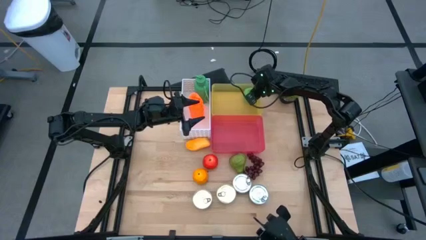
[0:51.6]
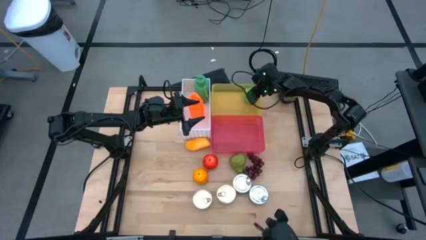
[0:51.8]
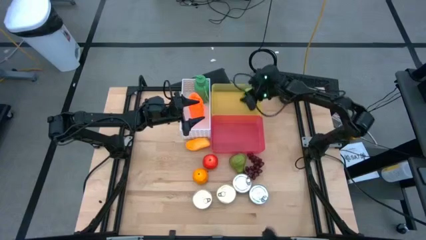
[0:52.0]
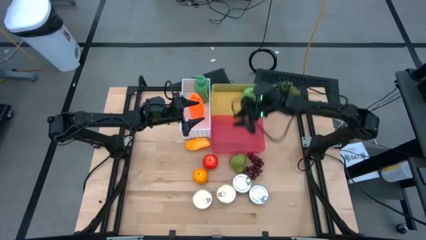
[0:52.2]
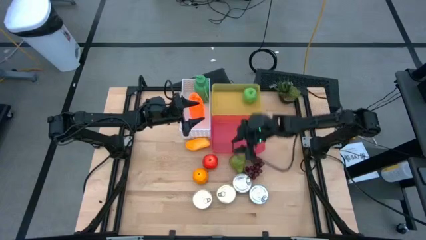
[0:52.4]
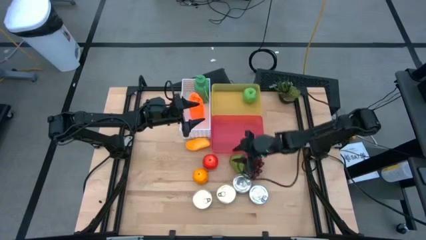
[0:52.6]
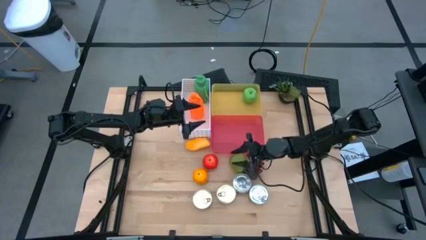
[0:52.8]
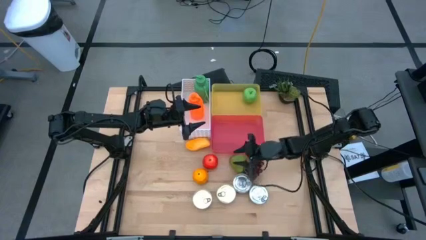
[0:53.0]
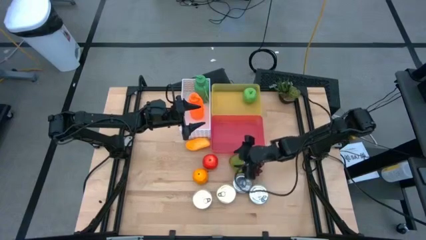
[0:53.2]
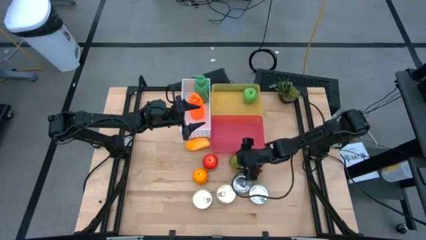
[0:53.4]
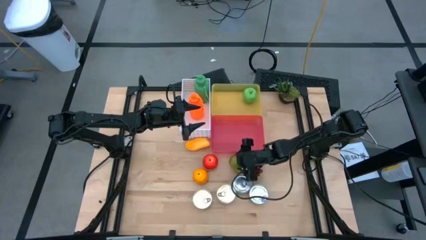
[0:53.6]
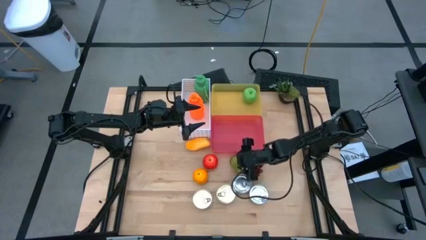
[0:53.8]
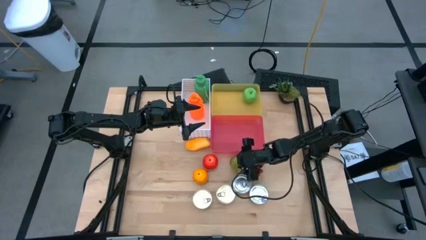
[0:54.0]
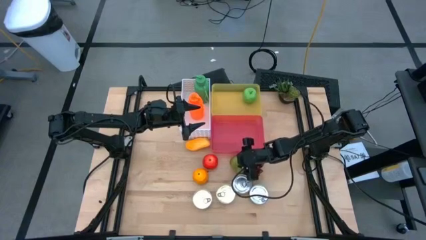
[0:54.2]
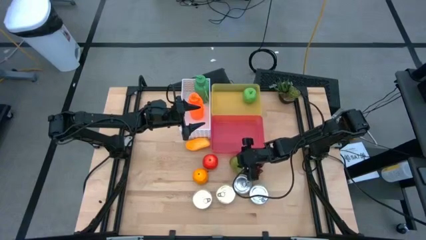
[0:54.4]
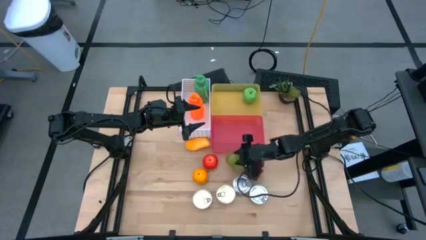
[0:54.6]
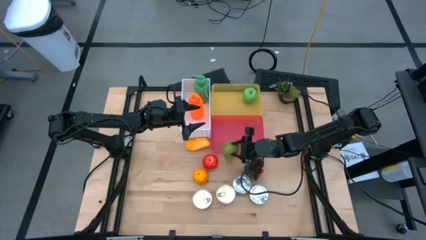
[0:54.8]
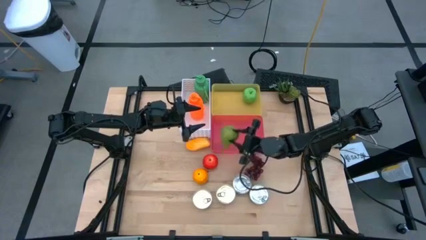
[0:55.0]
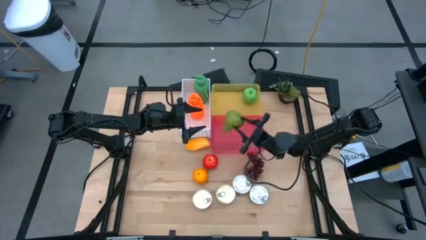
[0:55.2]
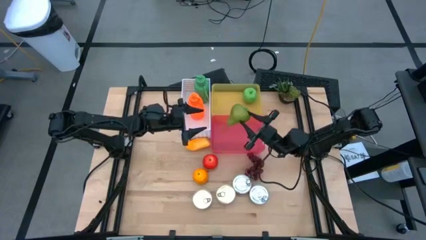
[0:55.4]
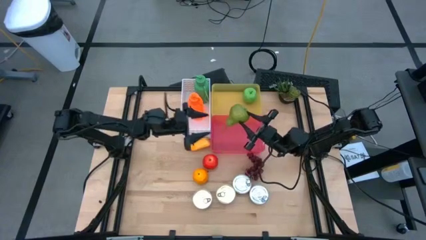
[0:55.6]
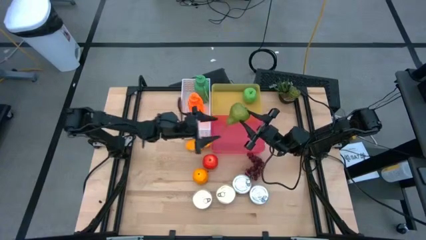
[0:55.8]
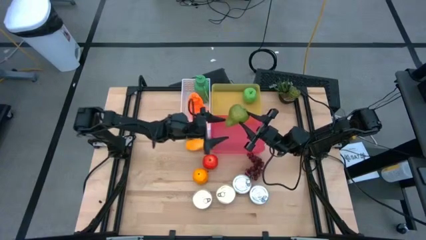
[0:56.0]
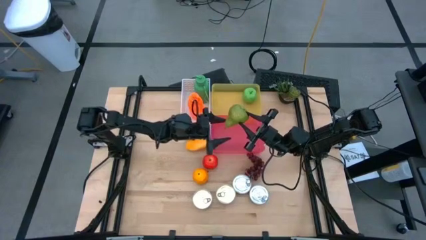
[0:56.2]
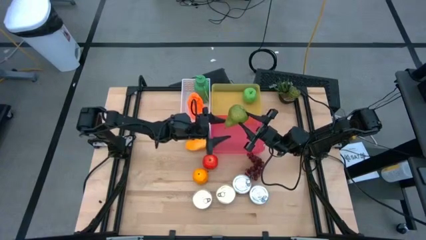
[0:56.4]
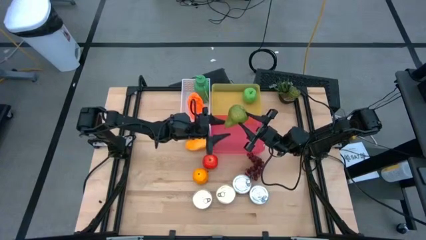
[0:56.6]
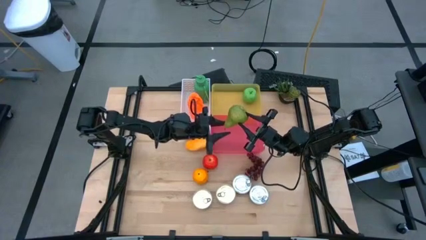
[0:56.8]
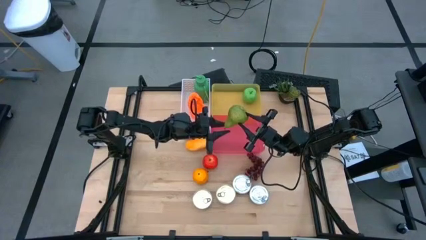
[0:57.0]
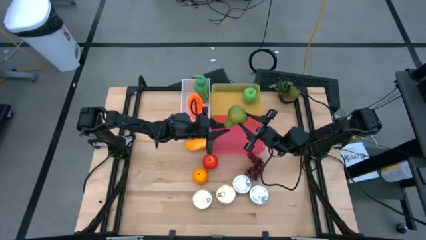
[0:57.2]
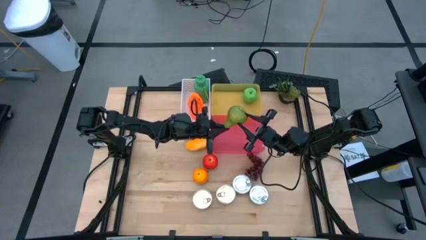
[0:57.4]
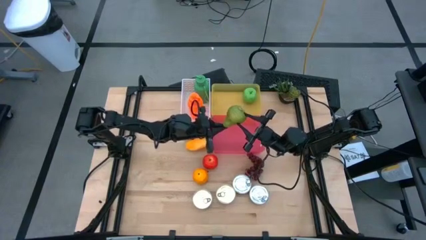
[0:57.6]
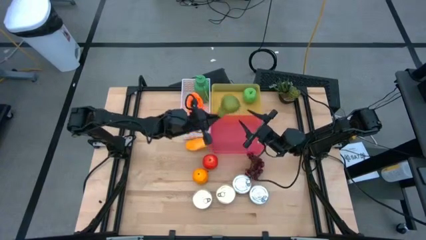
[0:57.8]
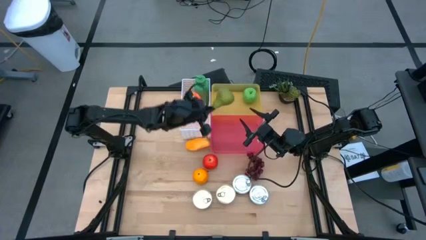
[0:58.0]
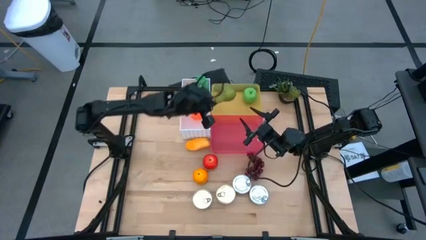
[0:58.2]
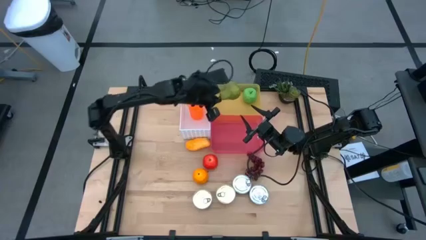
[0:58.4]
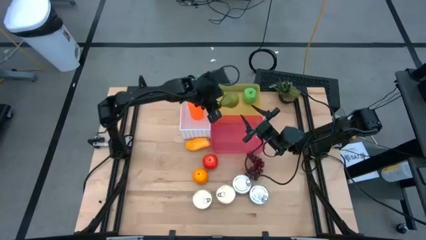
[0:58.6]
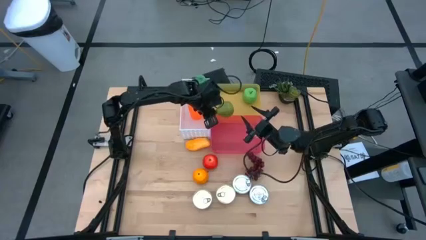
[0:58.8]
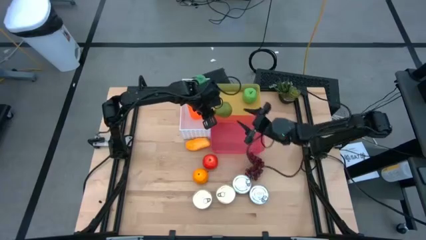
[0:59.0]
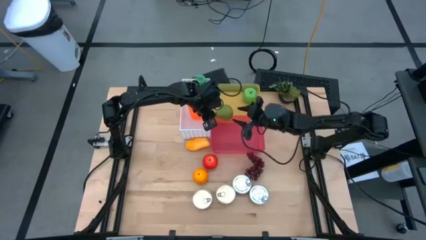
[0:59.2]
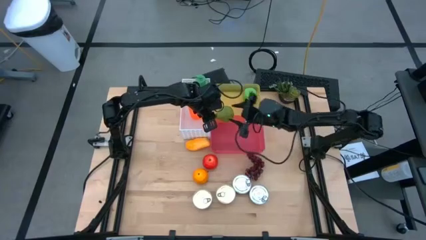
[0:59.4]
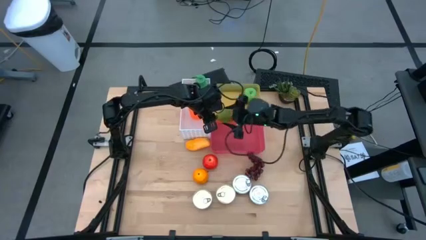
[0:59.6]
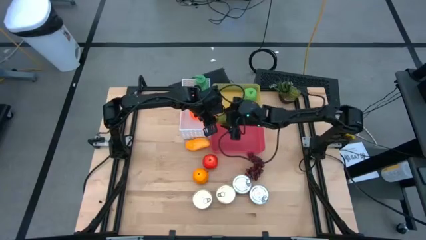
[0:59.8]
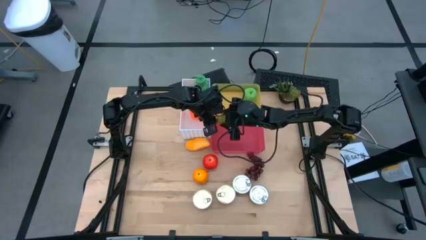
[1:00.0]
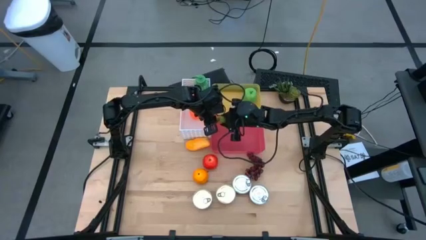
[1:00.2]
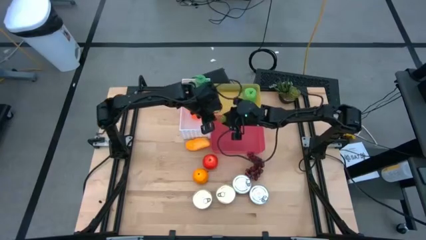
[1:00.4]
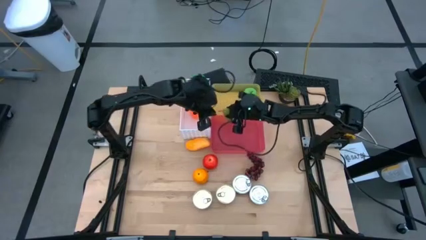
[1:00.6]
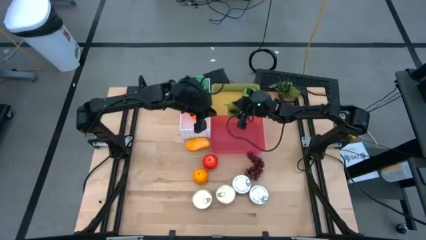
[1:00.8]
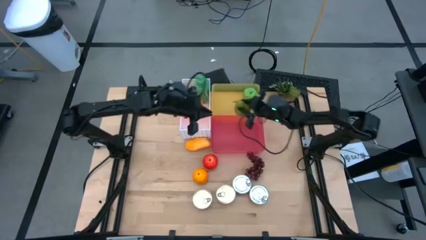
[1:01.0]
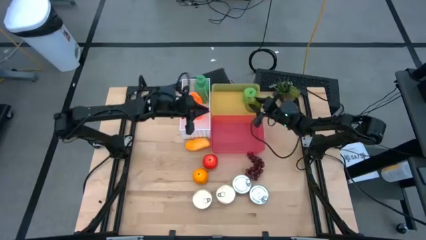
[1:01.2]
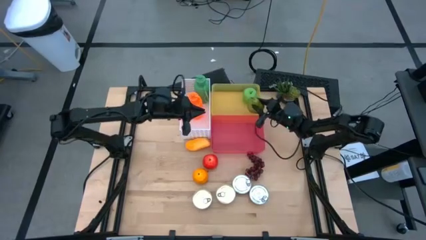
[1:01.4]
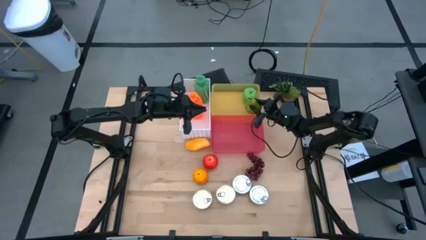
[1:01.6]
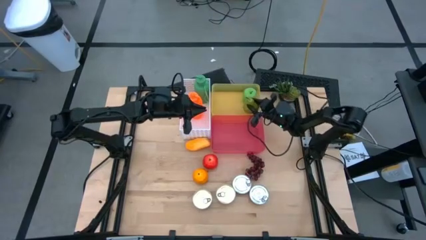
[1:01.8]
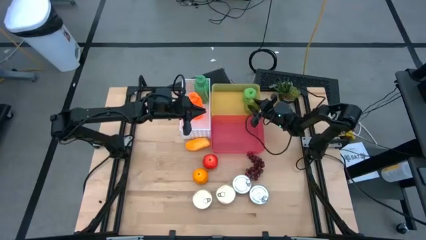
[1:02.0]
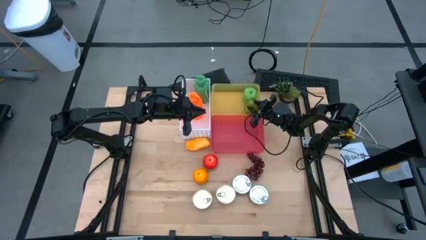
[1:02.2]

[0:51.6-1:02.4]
Task: Pick & Place Food Item
Put the green pear into the yellow bin

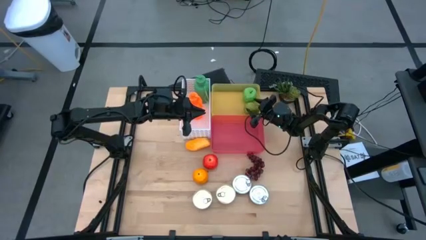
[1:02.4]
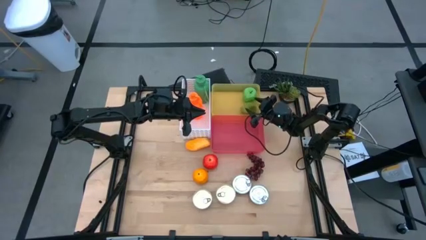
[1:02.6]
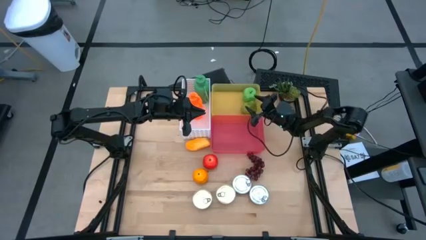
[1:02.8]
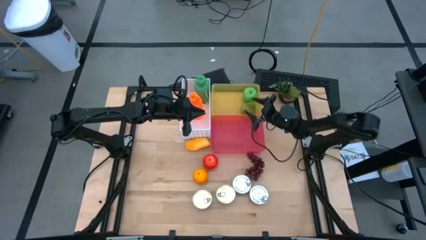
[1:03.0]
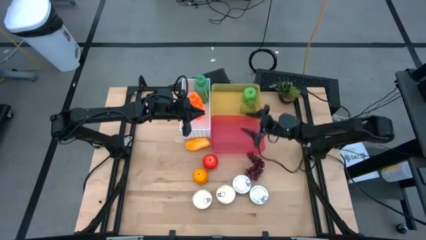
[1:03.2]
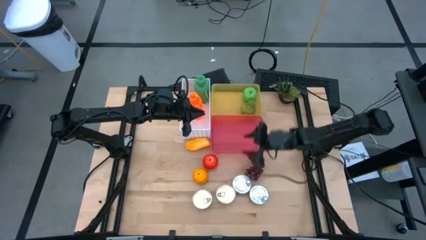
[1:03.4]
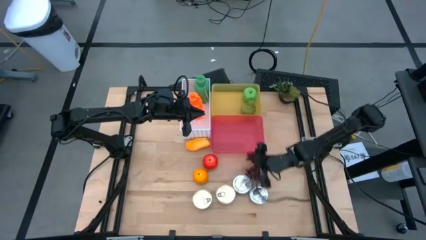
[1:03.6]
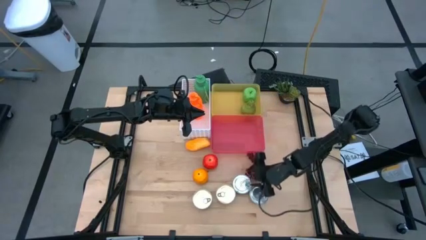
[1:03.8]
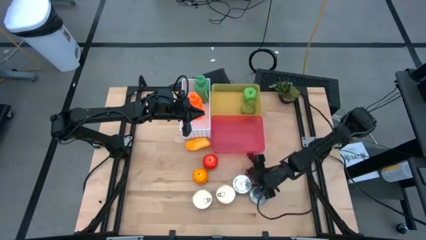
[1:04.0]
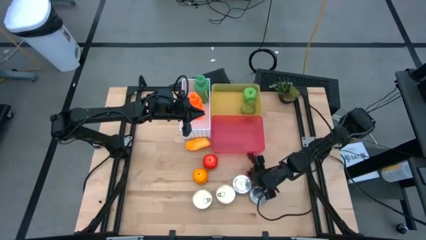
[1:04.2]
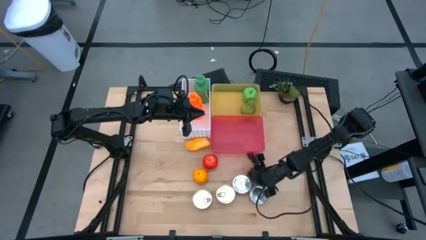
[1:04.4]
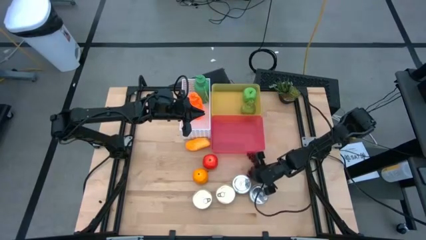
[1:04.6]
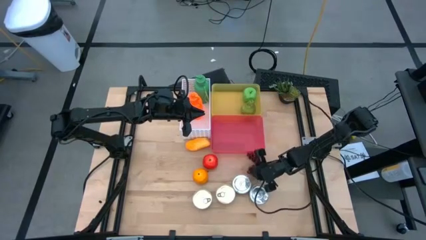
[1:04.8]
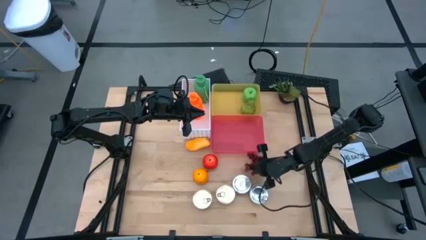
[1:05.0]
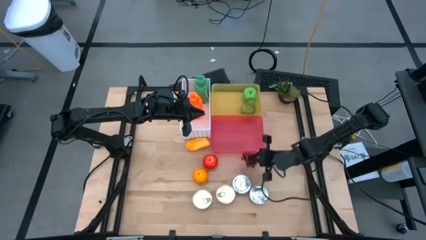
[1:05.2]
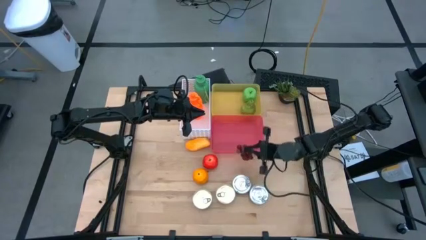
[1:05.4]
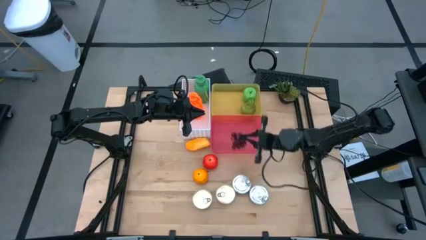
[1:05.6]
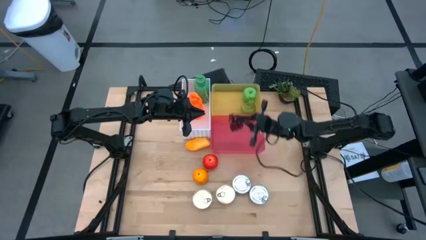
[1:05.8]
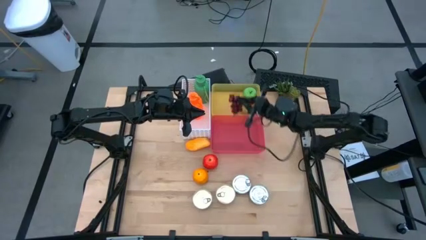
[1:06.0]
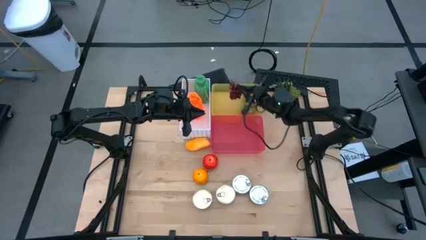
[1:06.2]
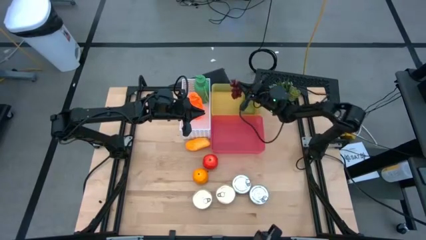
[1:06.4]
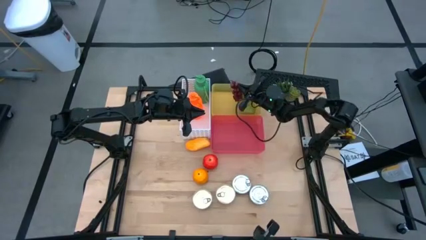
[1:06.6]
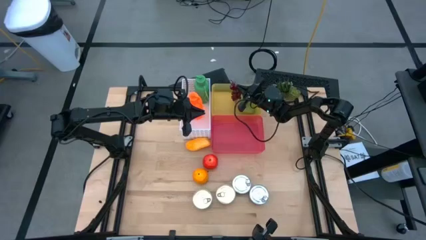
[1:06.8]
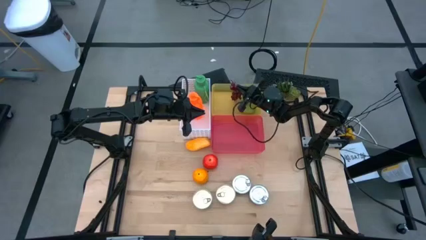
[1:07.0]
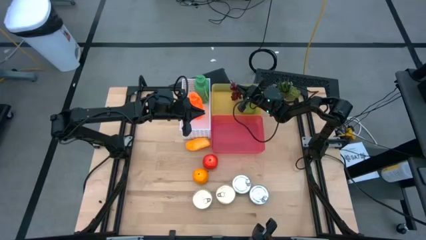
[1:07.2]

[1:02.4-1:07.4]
Put the red grapes into the yellow bin
